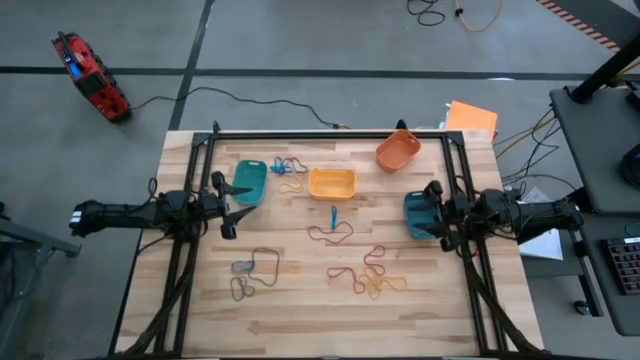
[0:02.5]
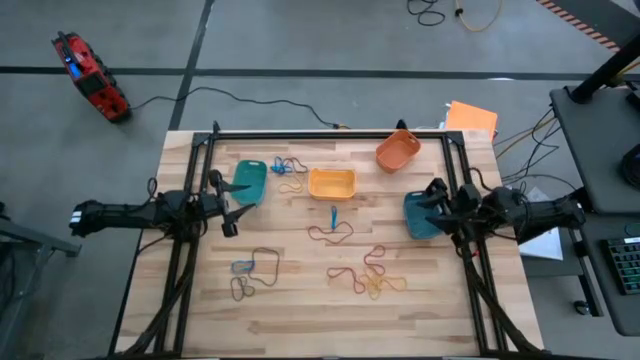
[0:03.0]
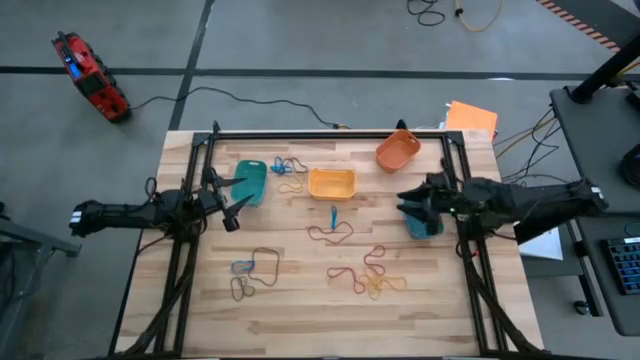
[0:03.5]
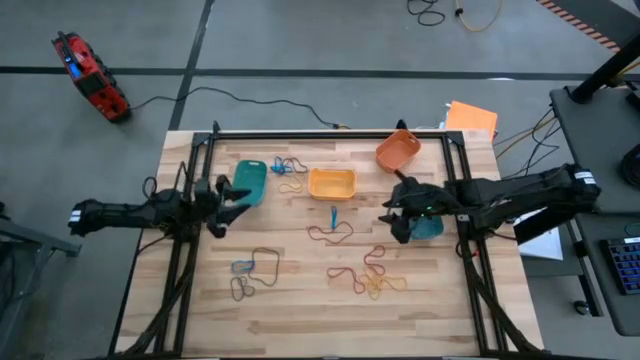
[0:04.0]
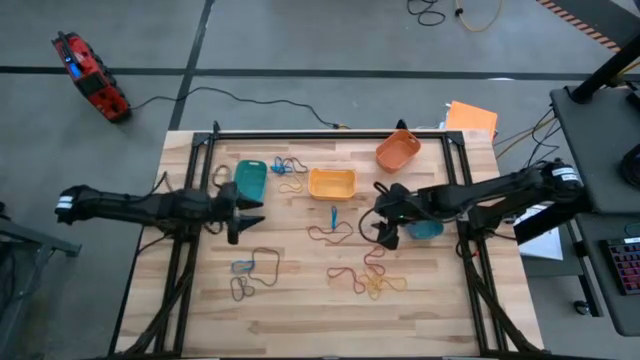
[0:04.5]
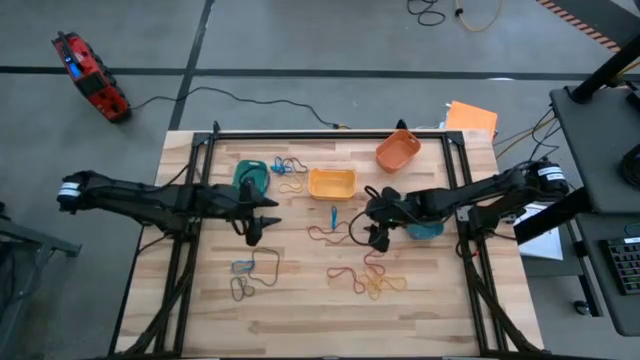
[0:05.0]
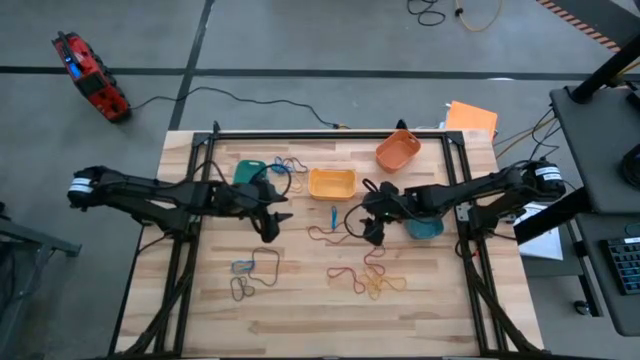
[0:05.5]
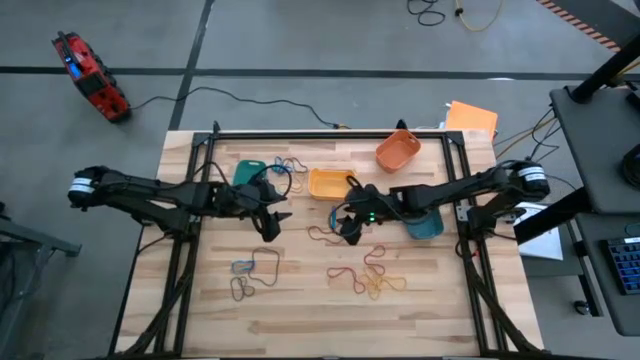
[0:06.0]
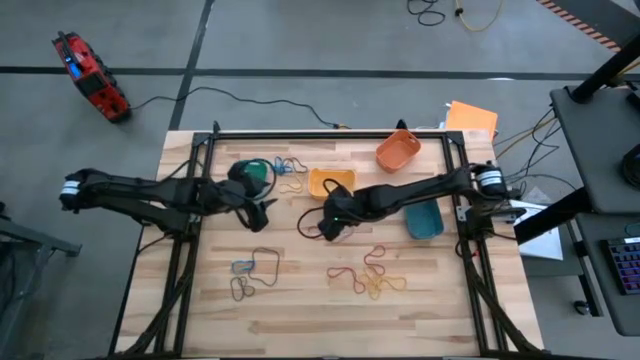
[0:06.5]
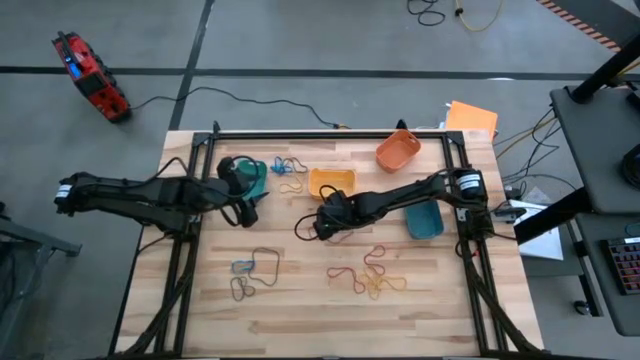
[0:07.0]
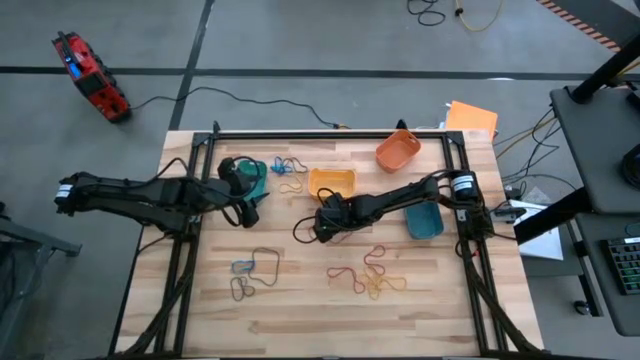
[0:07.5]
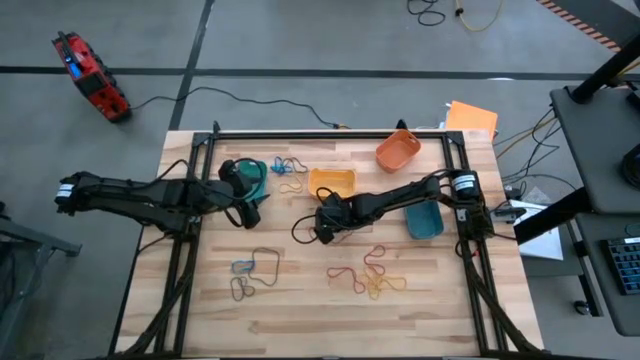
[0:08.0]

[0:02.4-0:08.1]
Task: Sort rubber bands into baskets
Put the blue rubberband into the blue bin

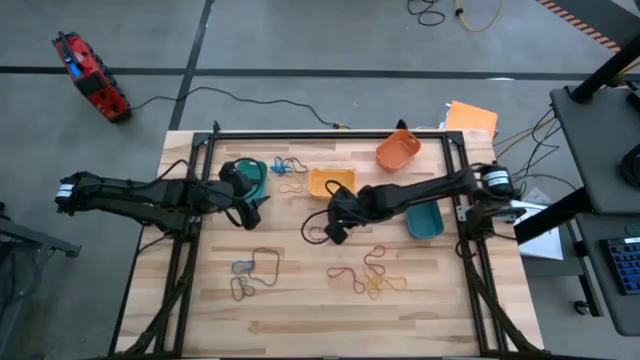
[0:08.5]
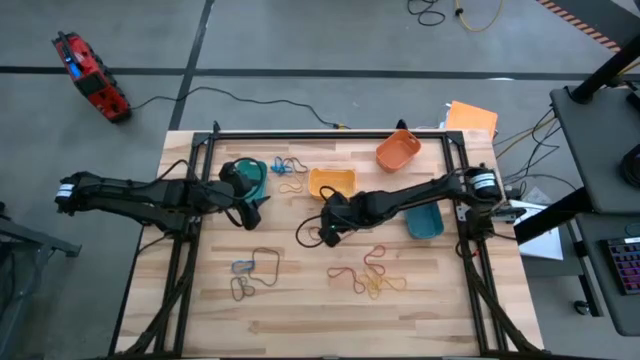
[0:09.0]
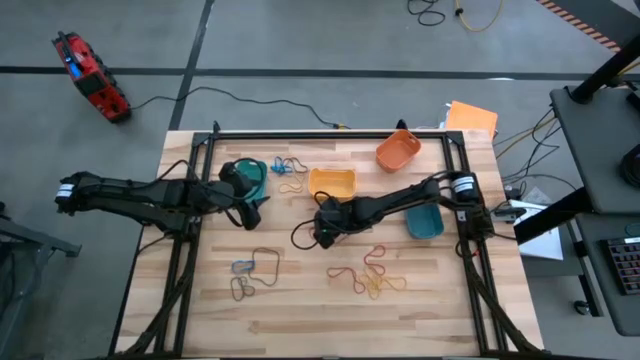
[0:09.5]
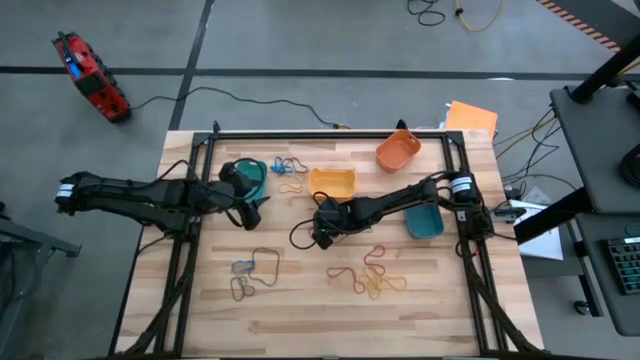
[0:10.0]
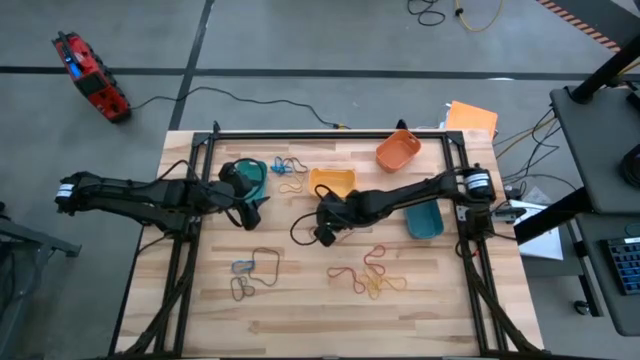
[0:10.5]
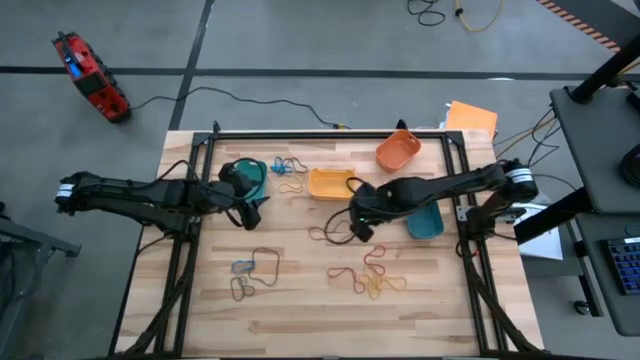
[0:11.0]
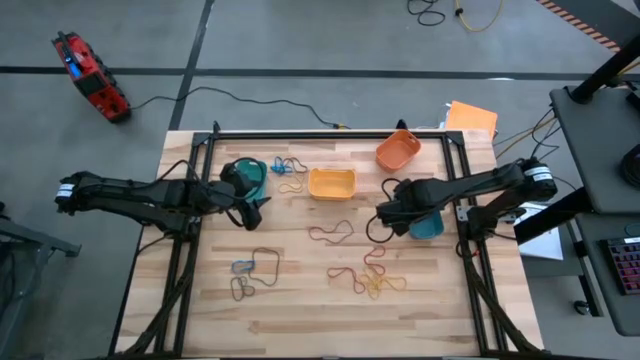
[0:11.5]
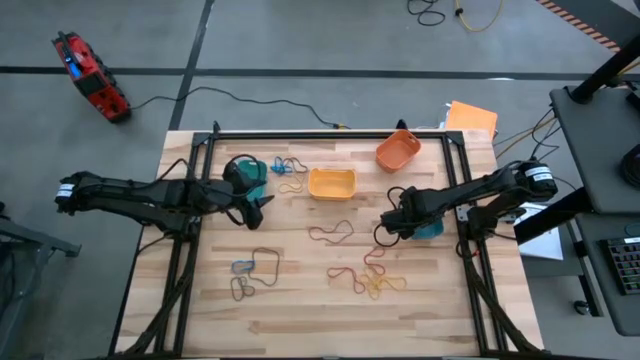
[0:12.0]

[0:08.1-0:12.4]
Put the blue rubberband into the blue bin

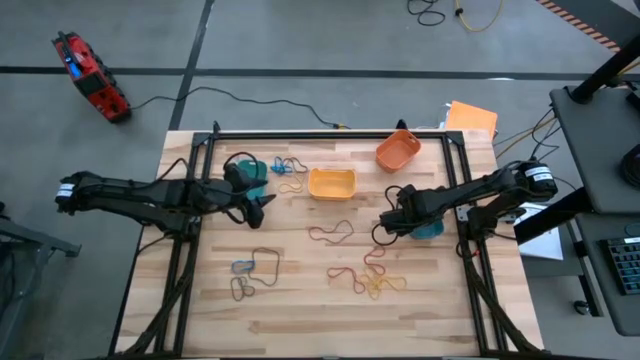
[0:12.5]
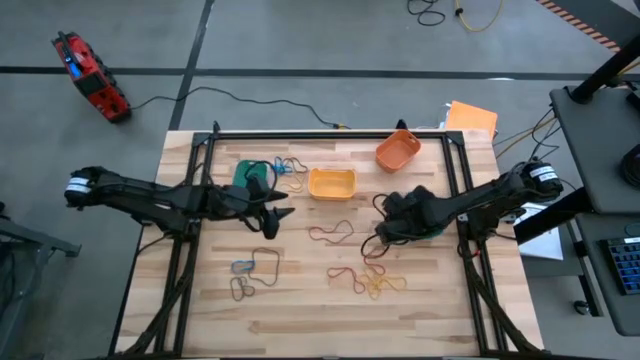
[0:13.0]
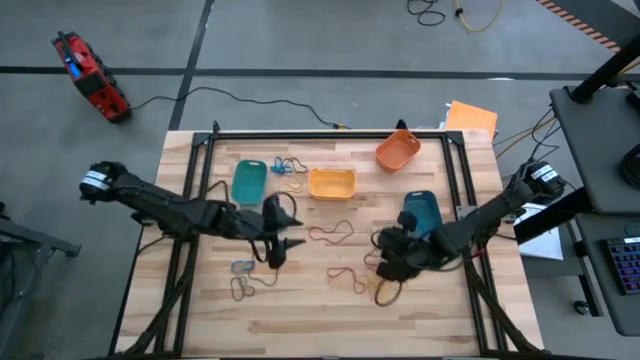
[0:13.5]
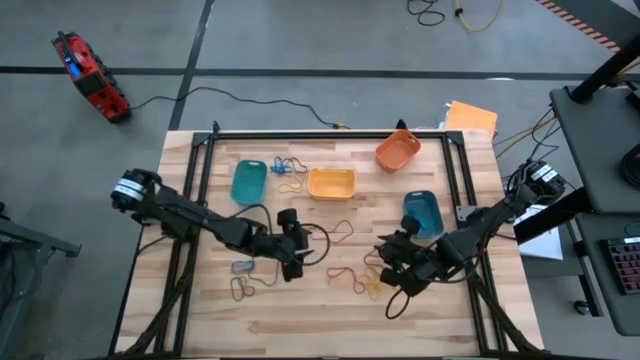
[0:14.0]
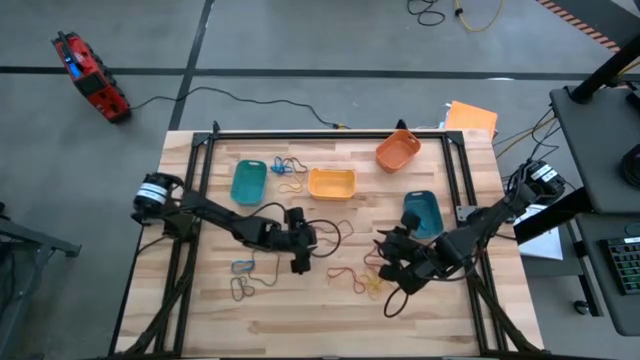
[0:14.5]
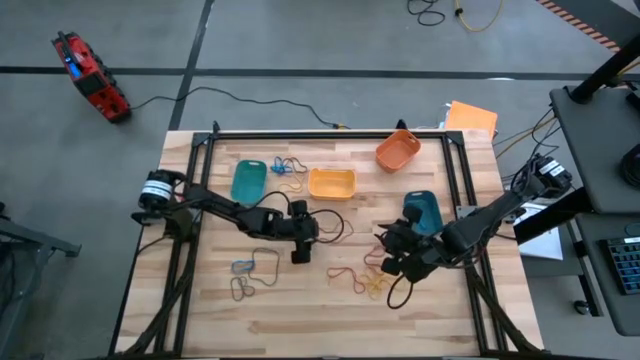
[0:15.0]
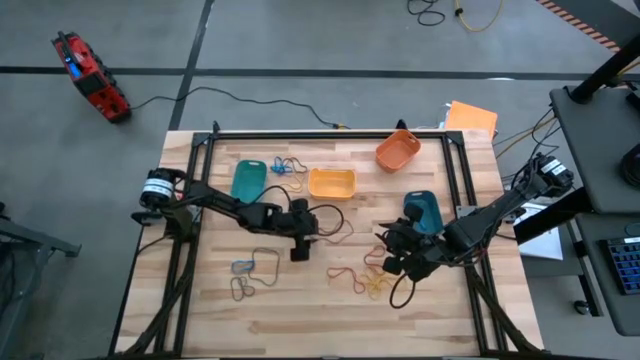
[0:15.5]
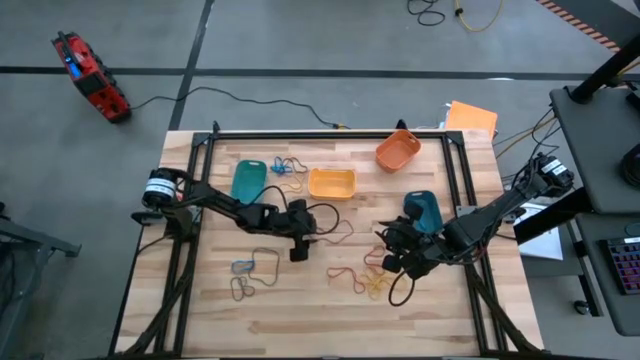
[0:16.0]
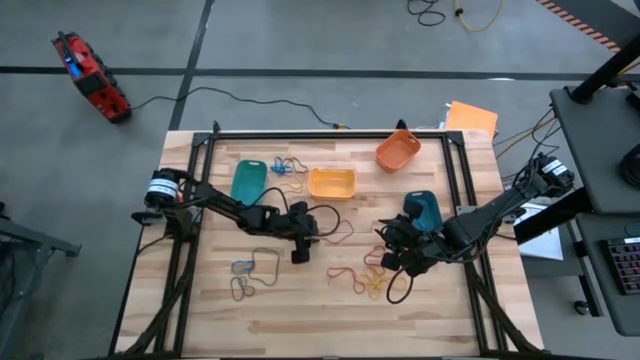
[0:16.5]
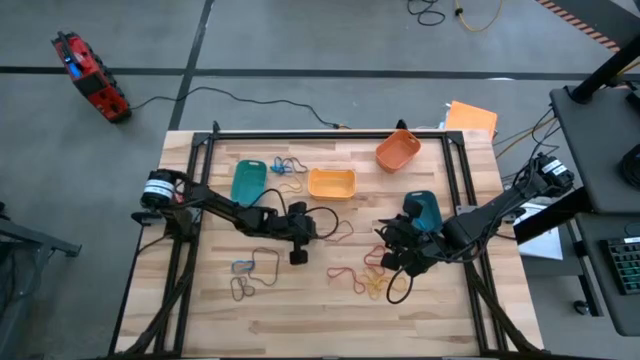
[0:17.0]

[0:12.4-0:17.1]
Put the red rubberband into the green bin

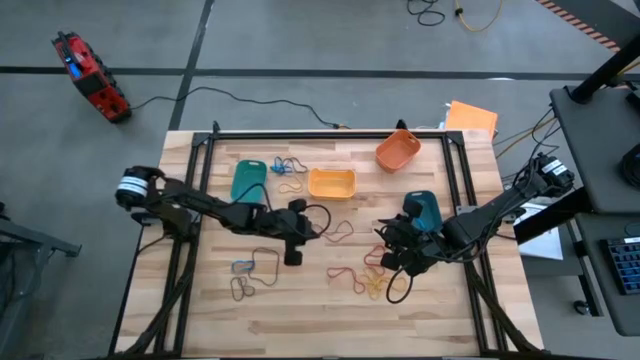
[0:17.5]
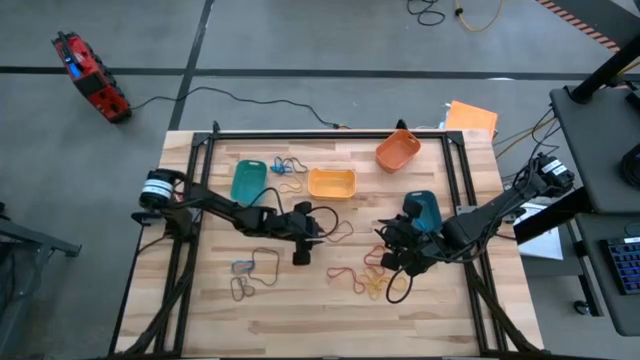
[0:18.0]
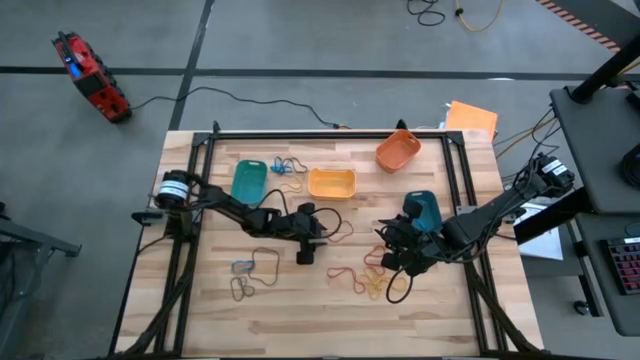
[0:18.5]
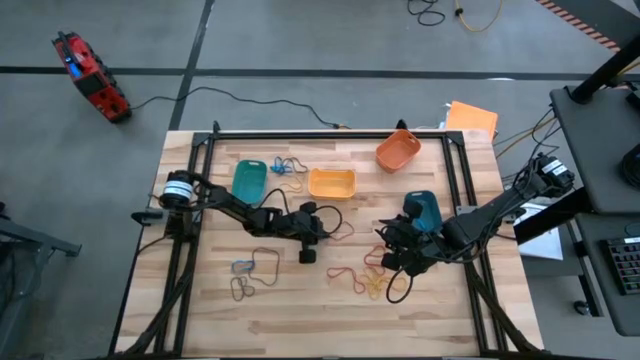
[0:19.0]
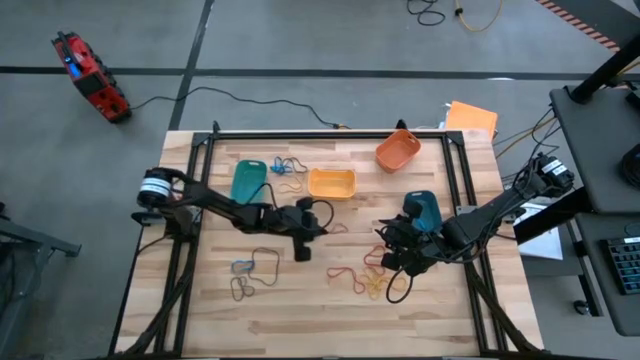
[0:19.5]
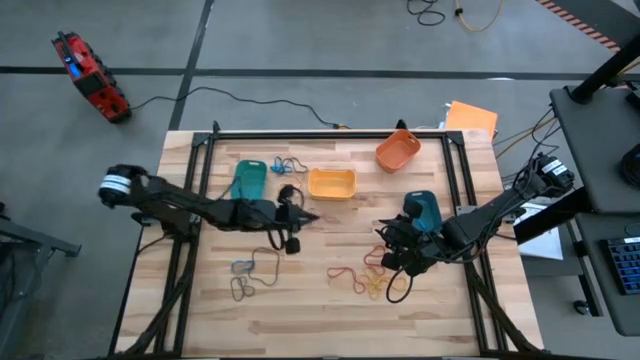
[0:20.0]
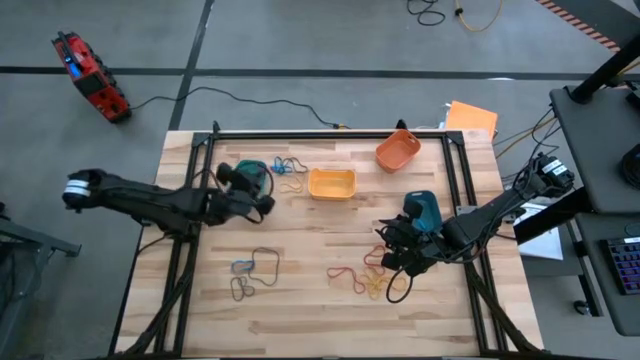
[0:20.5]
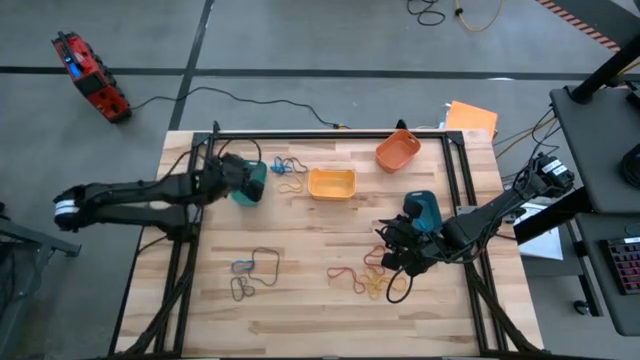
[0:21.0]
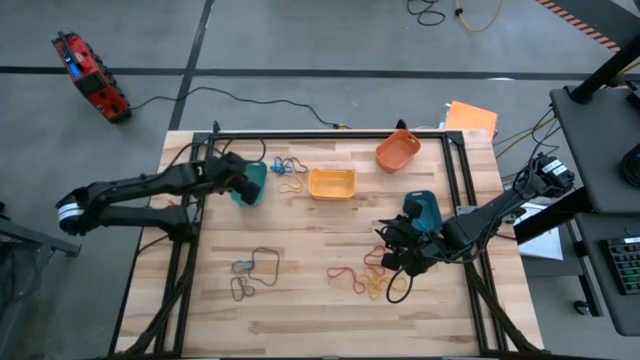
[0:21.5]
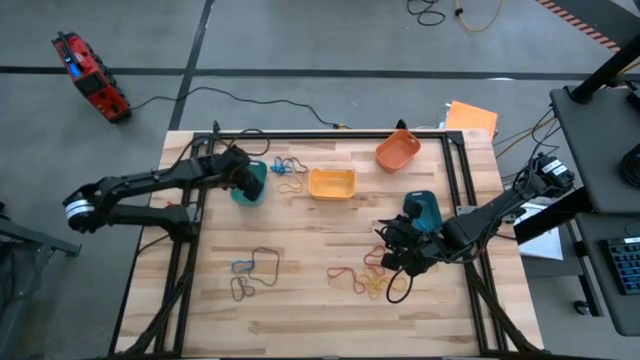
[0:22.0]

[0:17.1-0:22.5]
Put the red rubberband into the green bin

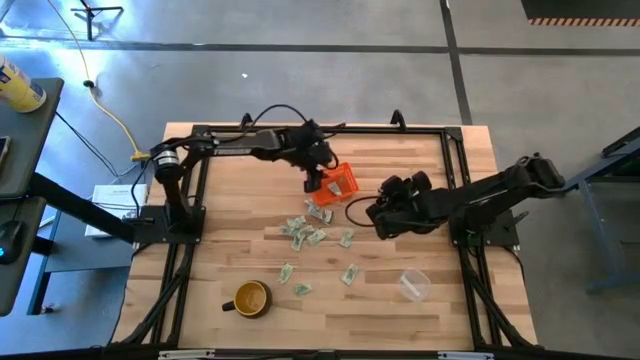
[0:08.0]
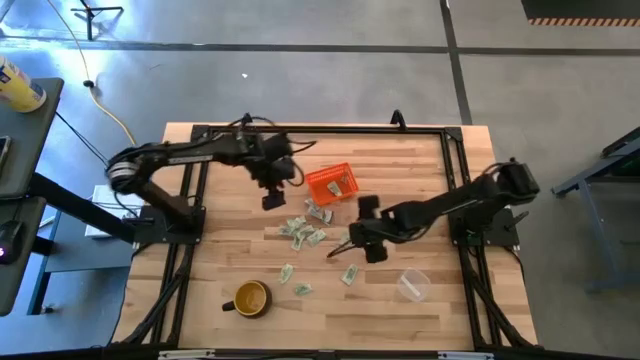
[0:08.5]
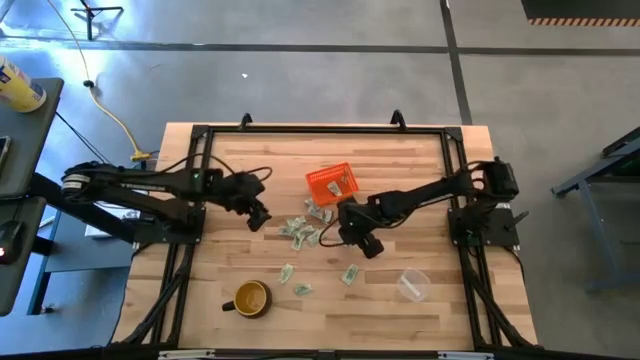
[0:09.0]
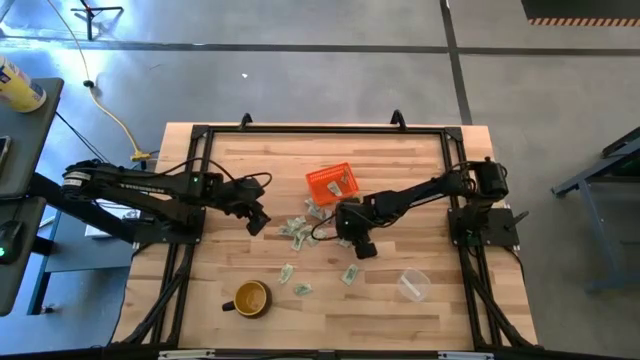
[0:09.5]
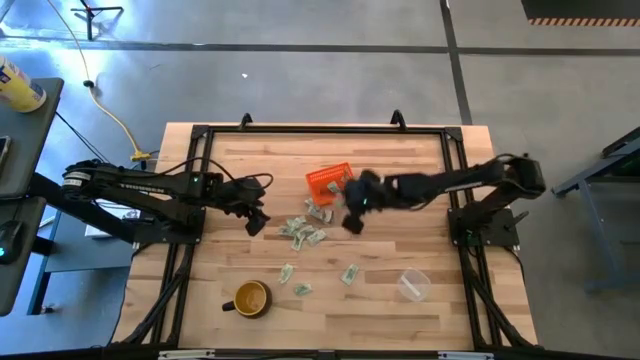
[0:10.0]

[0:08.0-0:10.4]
Task: Pick and place items into bin
Put the white stevia packet into the orange bin
